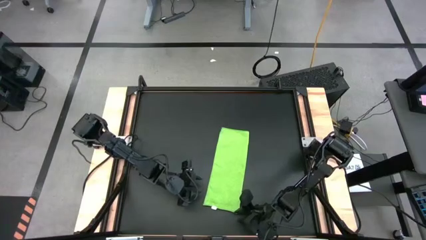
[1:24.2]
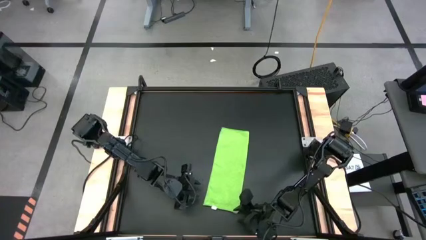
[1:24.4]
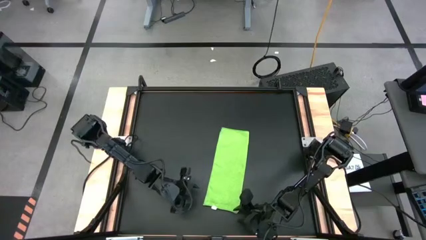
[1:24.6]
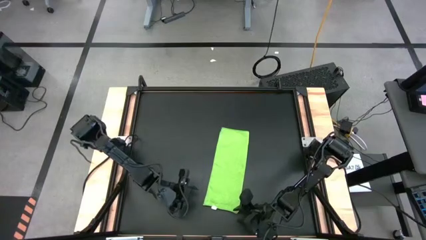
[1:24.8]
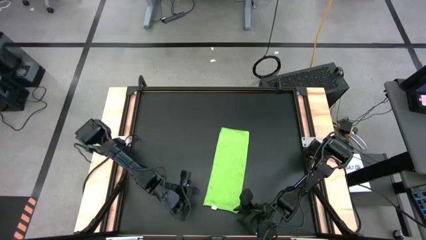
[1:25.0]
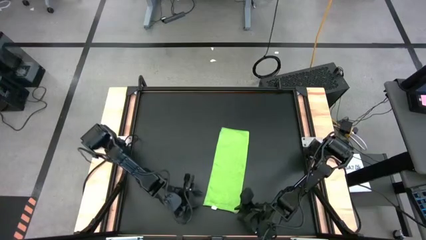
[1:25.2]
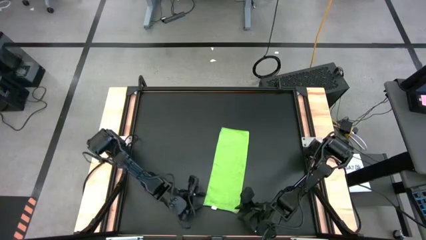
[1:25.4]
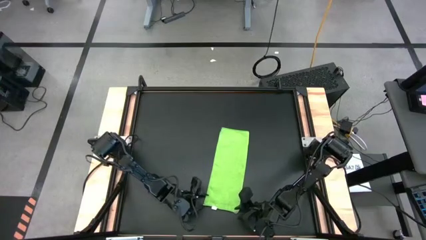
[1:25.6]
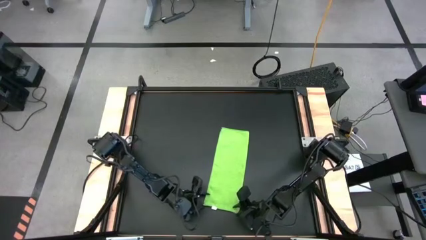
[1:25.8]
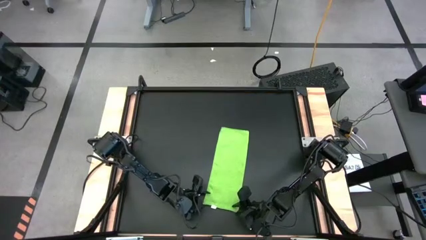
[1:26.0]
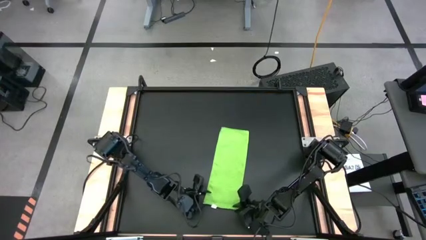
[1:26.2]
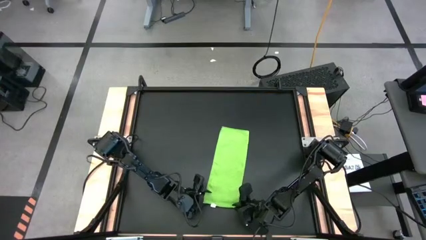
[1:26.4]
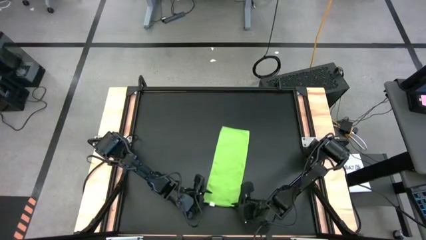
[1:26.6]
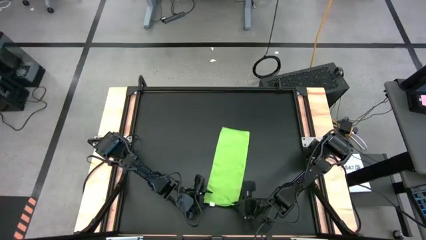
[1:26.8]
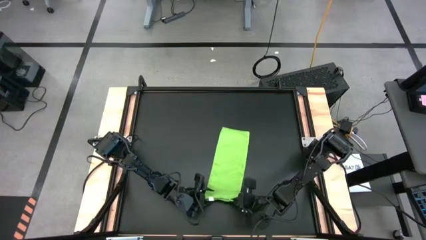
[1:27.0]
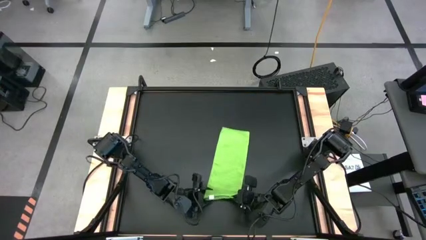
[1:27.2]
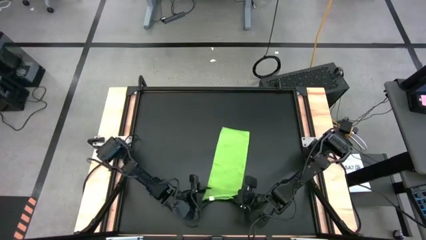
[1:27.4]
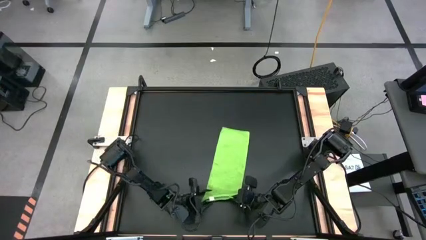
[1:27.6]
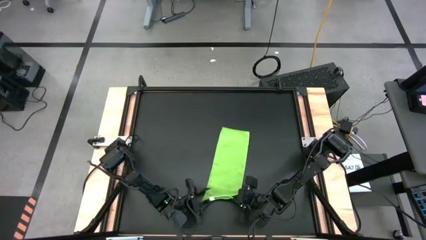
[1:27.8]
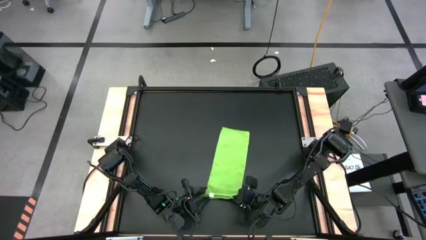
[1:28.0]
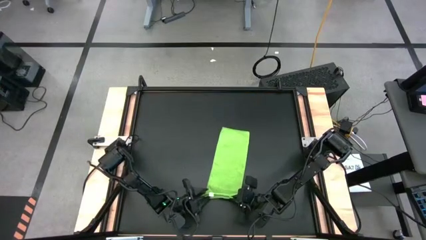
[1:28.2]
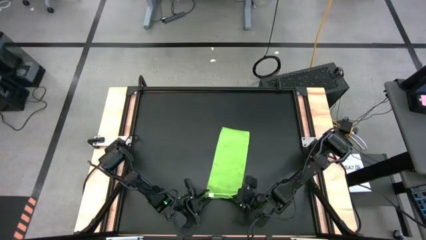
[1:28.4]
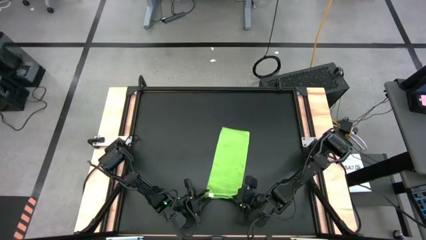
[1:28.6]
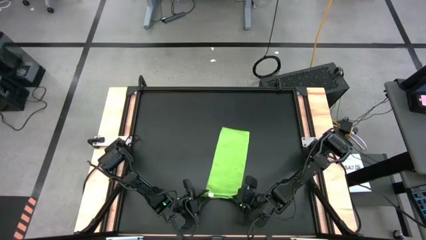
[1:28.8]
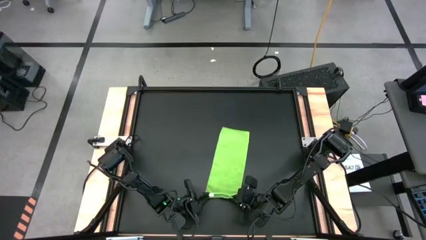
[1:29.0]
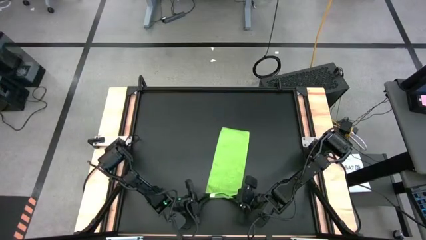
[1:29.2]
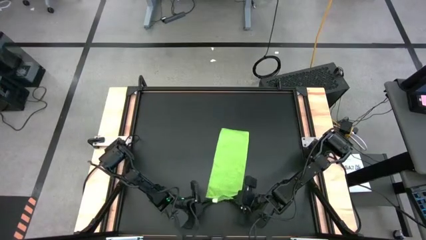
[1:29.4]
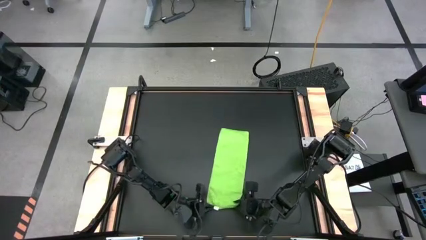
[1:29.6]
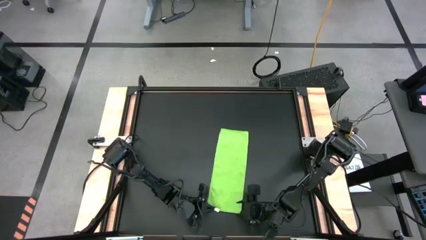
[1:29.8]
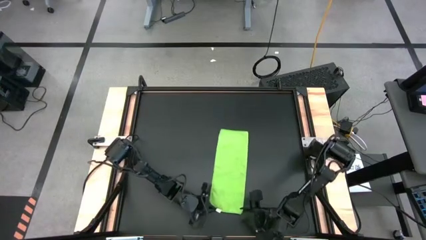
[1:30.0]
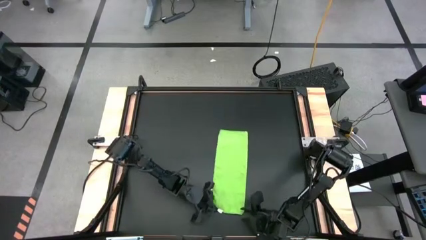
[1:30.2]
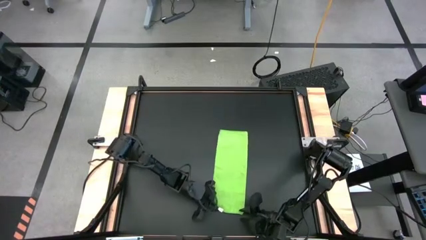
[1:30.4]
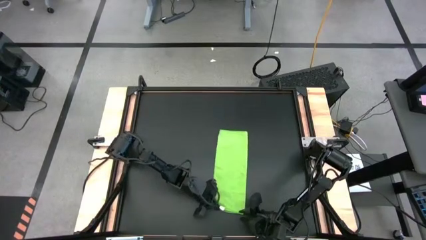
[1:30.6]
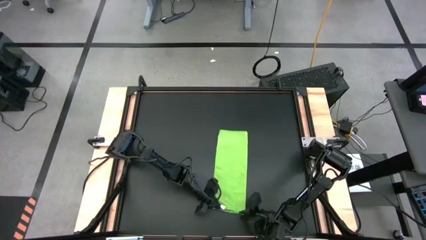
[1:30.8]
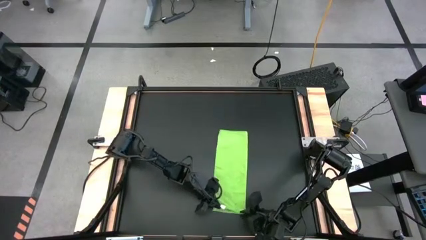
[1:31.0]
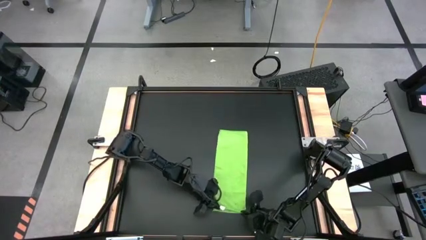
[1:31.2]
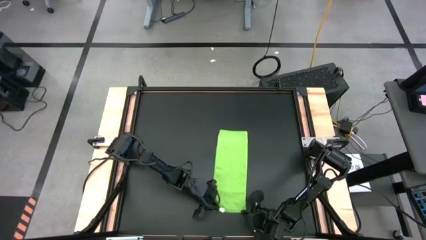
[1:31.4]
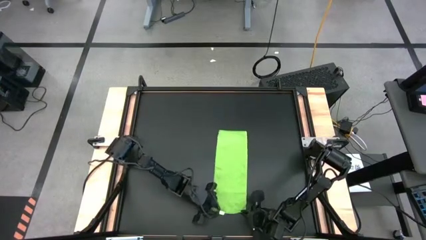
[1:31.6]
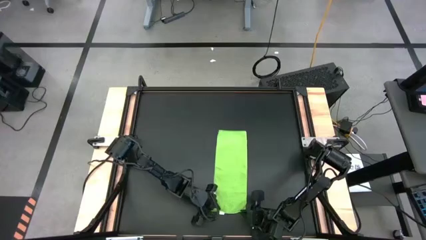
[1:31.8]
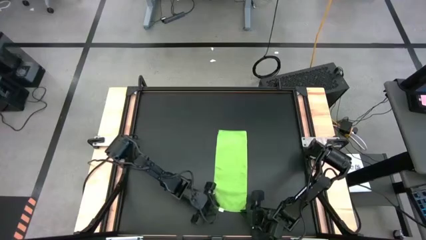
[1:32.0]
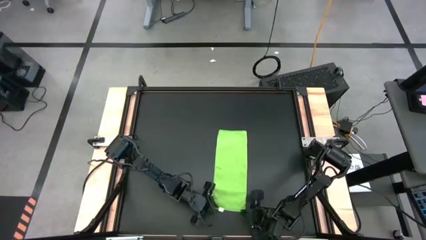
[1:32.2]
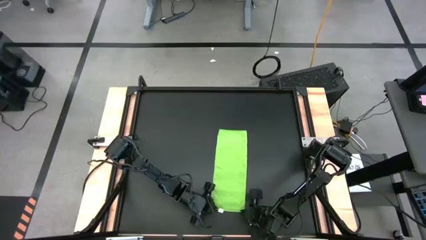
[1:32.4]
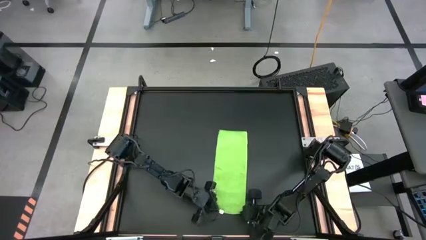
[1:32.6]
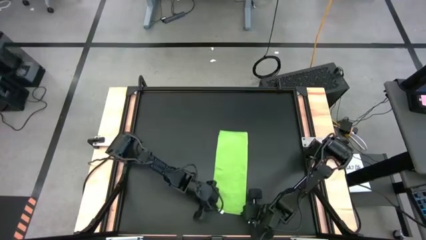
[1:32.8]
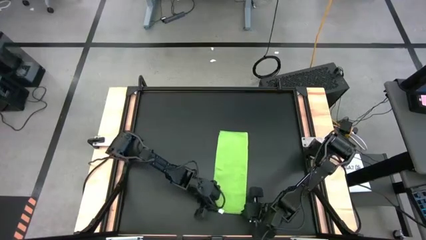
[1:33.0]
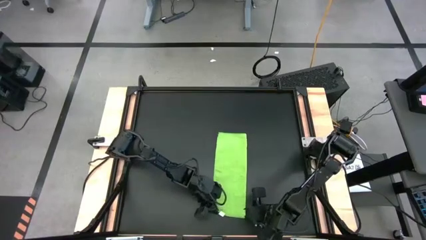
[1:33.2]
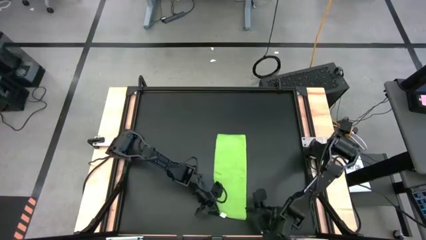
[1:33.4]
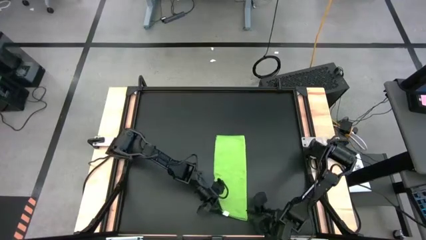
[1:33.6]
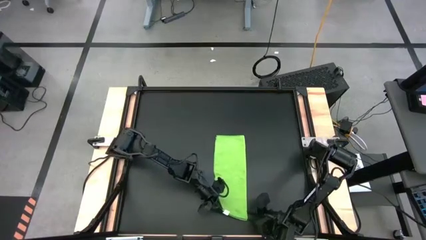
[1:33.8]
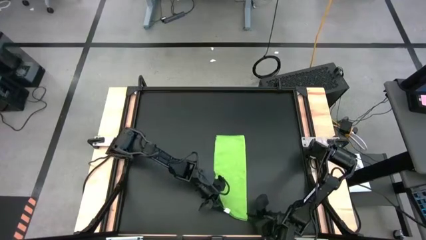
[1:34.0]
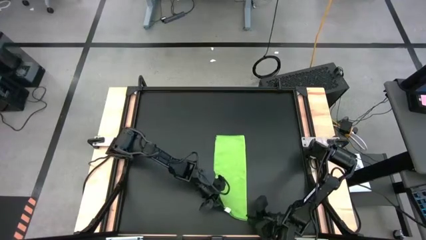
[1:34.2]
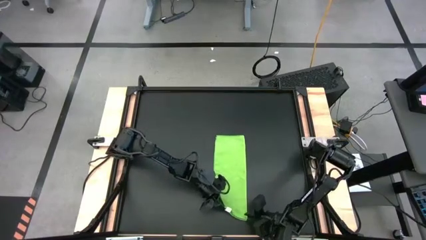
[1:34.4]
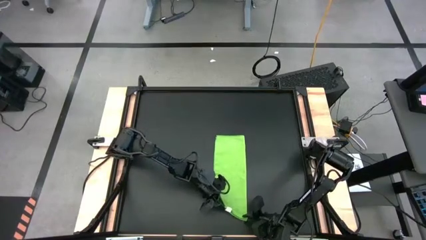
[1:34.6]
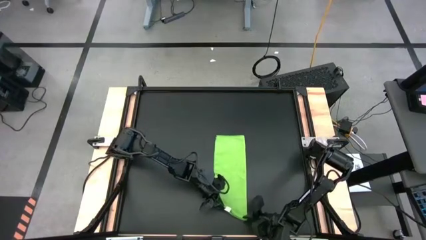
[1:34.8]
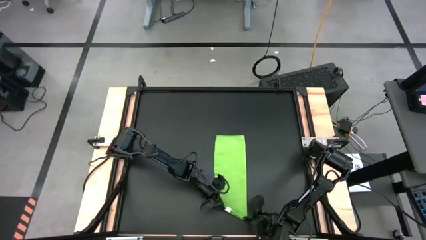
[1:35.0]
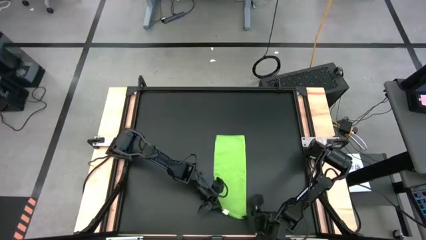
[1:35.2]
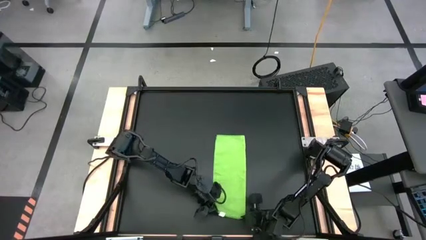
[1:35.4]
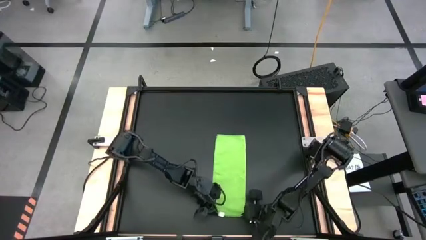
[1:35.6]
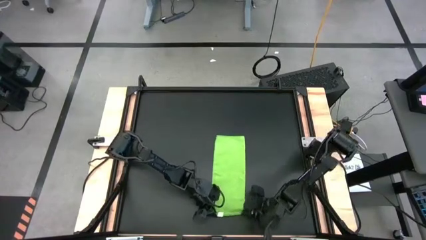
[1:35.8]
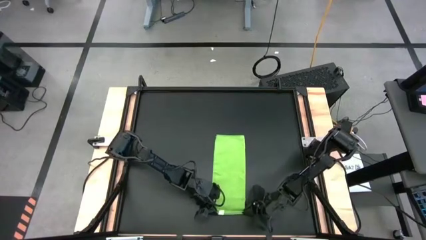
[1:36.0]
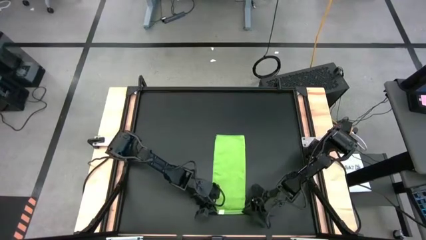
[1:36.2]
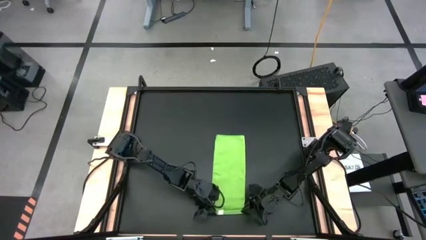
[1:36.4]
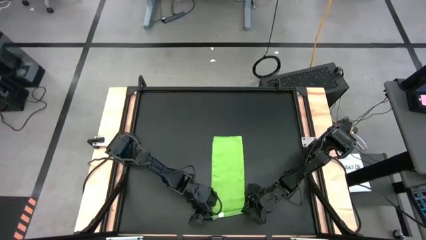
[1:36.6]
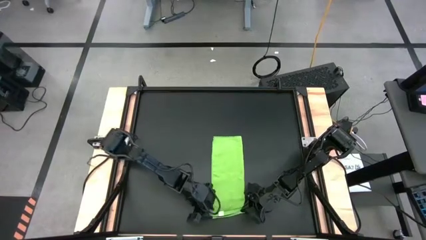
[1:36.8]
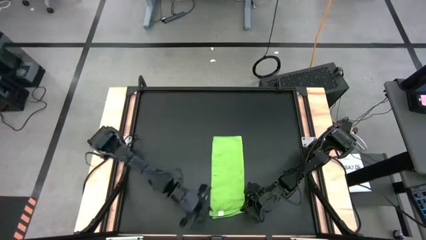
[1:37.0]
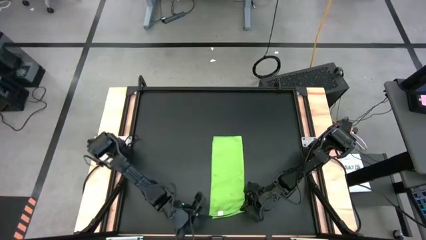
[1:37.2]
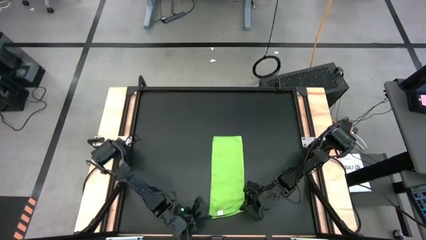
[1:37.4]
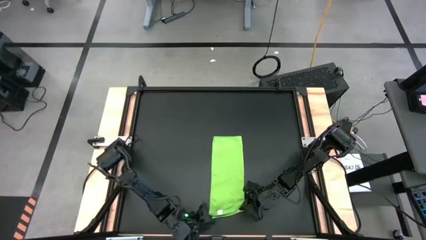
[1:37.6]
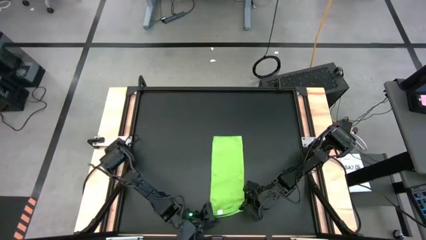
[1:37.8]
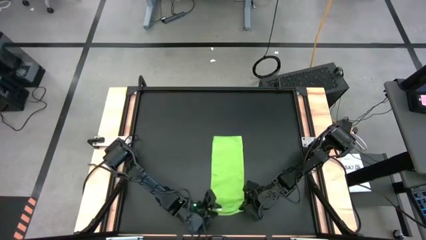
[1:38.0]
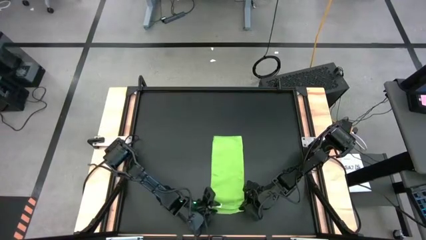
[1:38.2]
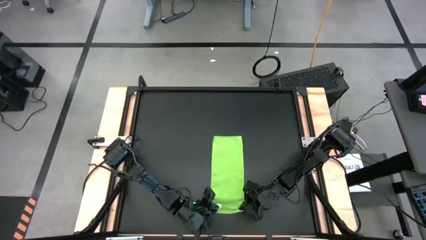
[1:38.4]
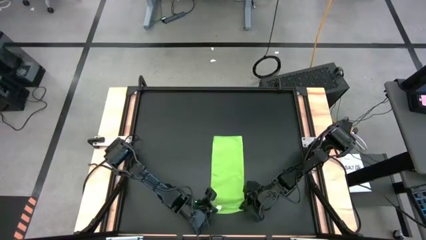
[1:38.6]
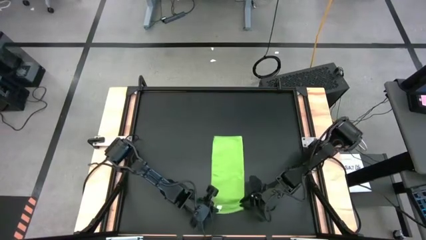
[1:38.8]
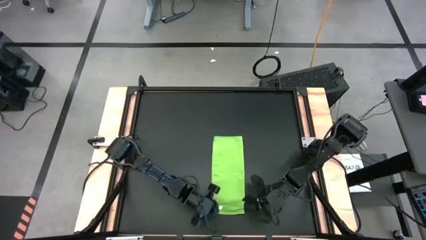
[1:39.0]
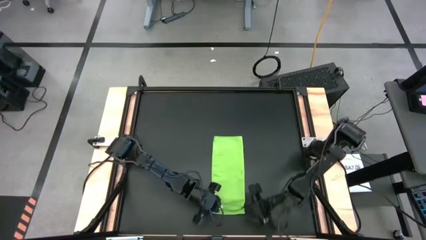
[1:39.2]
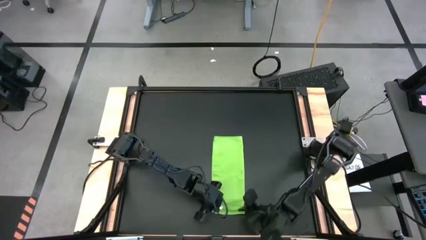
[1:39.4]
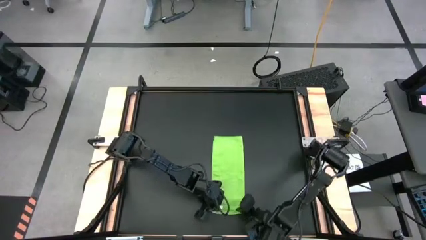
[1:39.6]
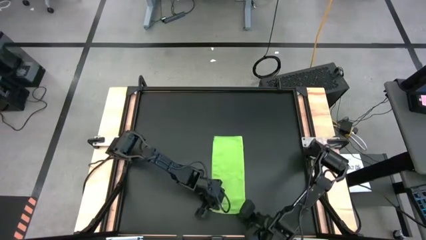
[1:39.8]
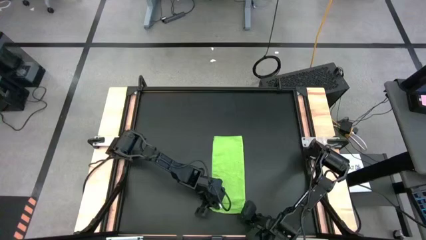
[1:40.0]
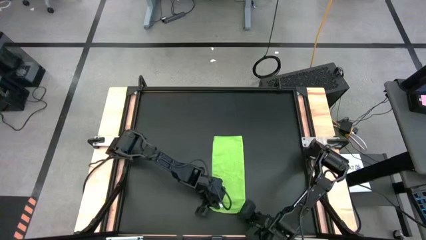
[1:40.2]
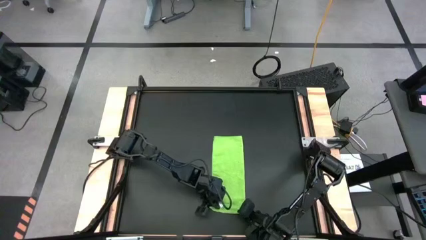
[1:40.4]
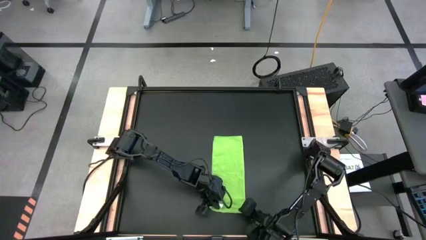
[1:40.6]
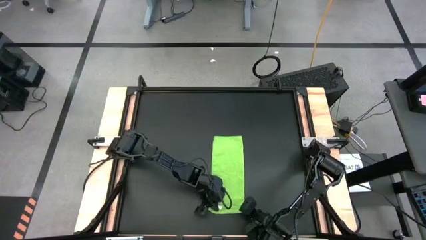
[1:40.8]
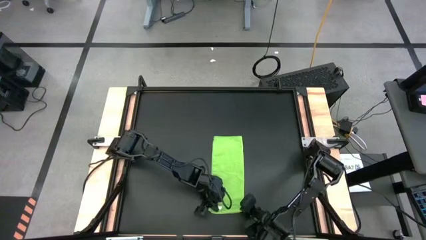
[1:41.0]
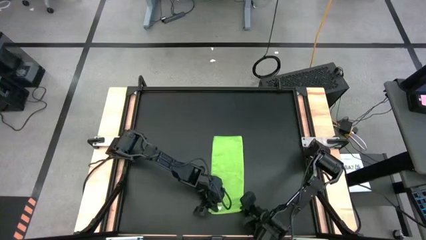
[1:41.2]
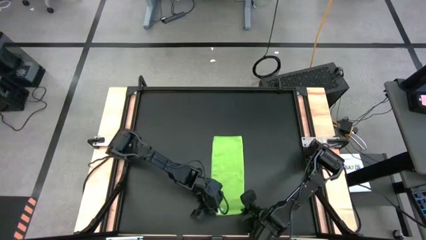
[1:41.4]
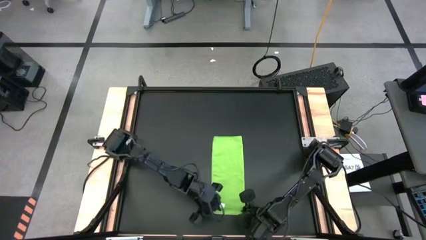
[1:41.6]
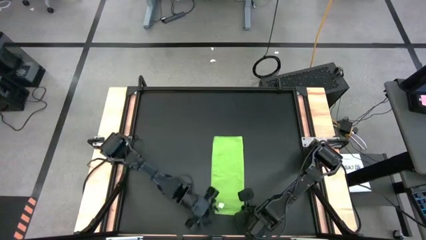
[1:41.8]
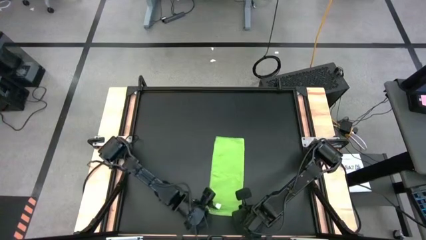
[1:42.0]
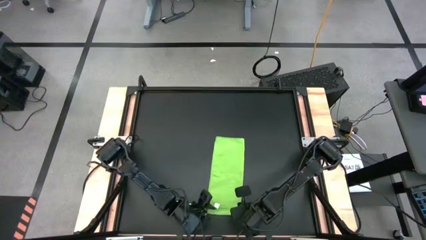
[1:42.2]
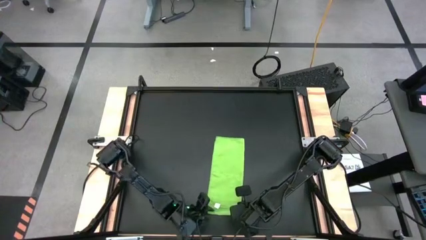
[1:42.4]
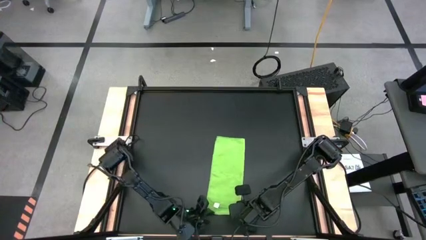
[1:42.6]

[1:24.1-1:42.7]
Task: Roll towel into tight, uniform cylinder
Roll the green towel
